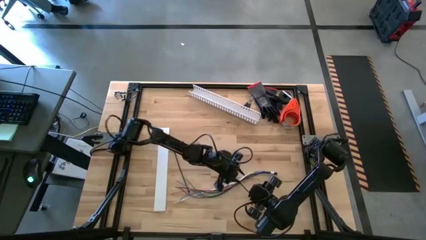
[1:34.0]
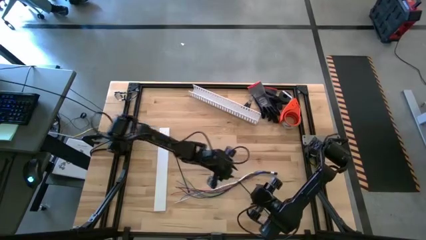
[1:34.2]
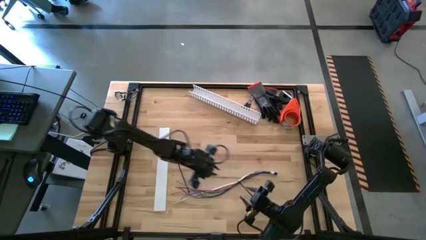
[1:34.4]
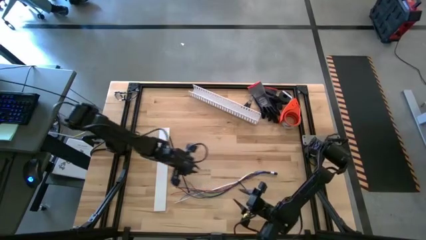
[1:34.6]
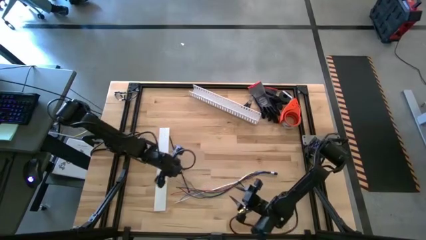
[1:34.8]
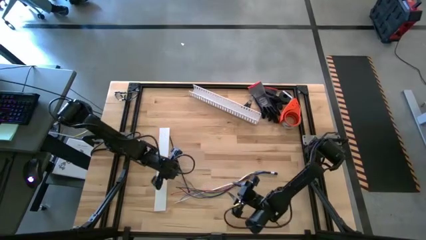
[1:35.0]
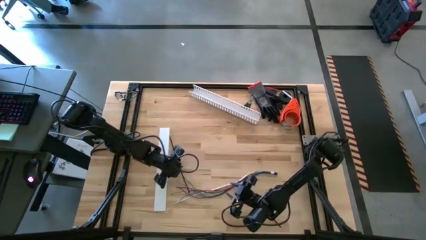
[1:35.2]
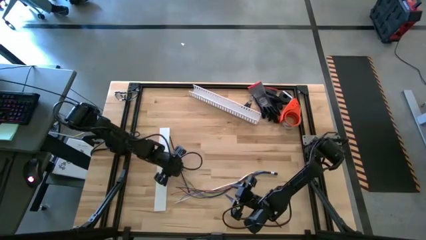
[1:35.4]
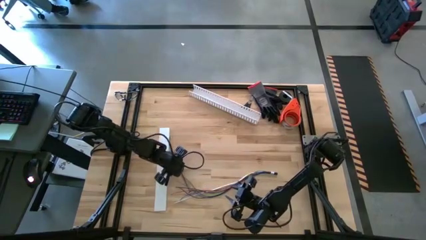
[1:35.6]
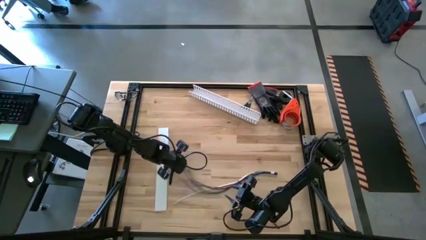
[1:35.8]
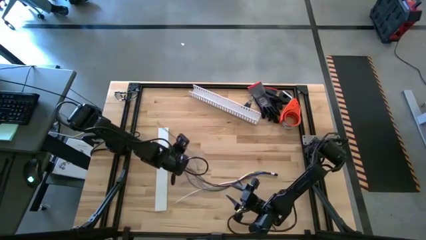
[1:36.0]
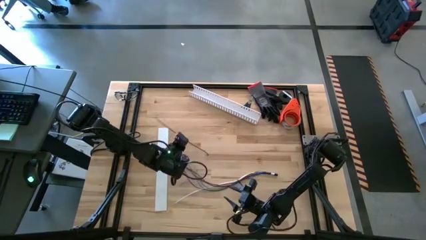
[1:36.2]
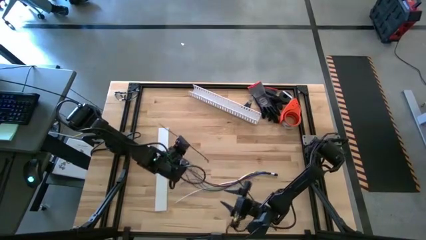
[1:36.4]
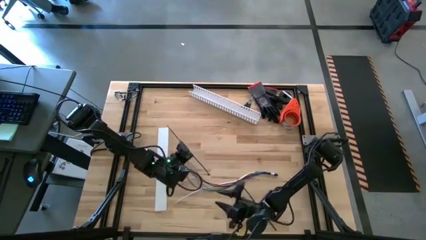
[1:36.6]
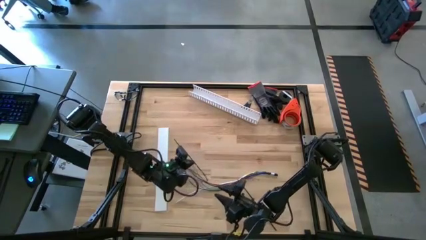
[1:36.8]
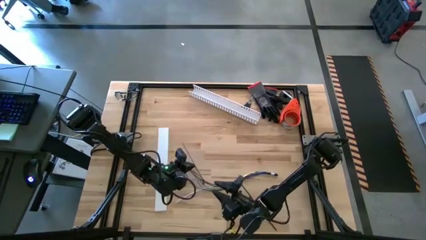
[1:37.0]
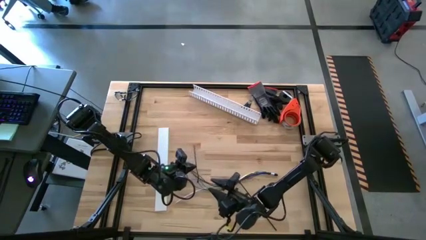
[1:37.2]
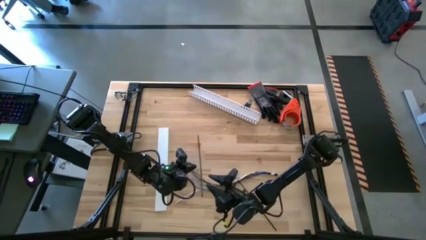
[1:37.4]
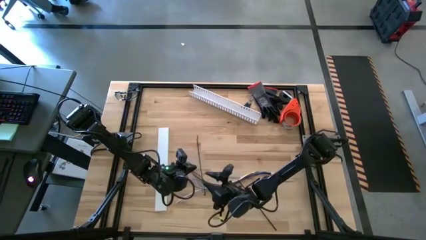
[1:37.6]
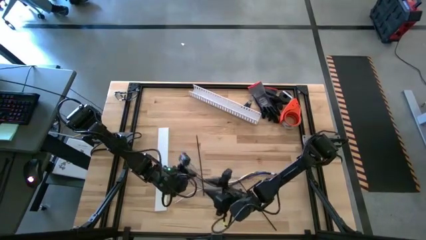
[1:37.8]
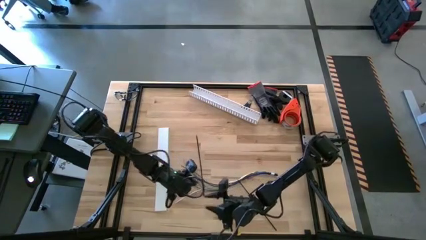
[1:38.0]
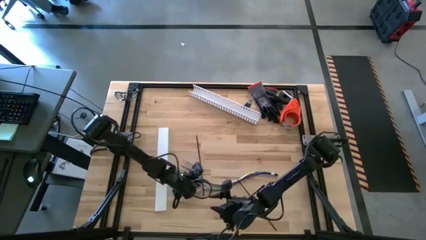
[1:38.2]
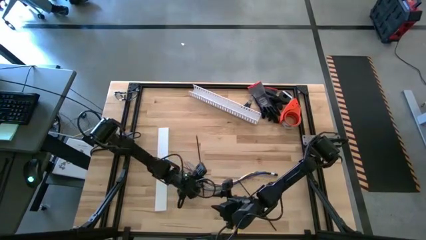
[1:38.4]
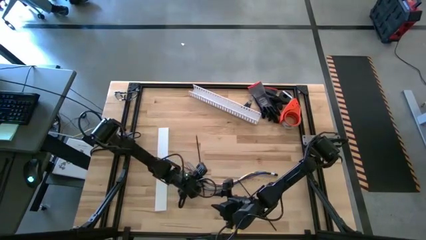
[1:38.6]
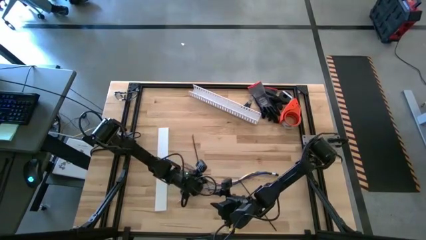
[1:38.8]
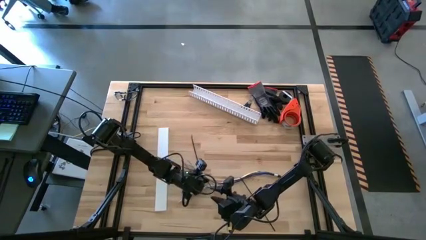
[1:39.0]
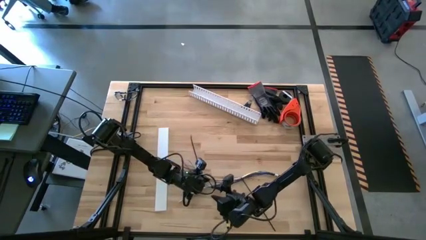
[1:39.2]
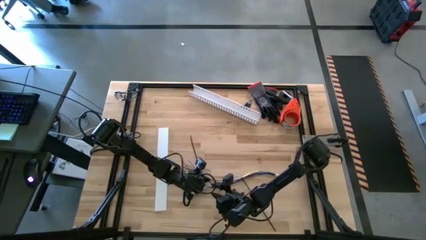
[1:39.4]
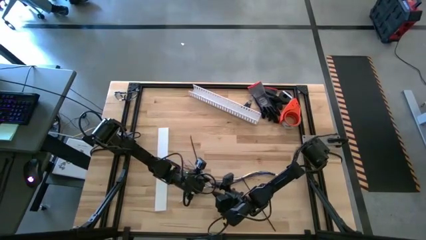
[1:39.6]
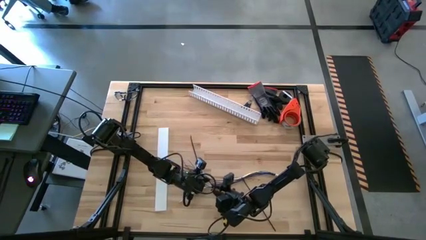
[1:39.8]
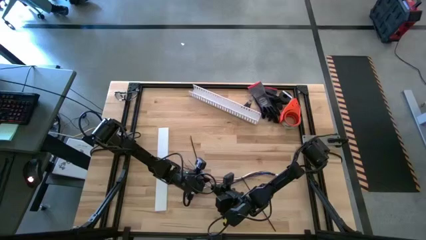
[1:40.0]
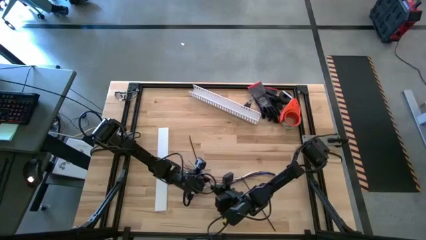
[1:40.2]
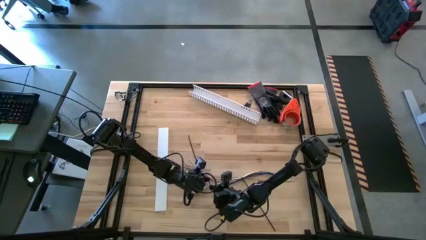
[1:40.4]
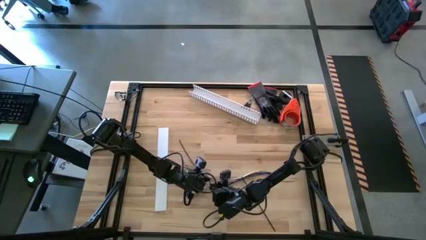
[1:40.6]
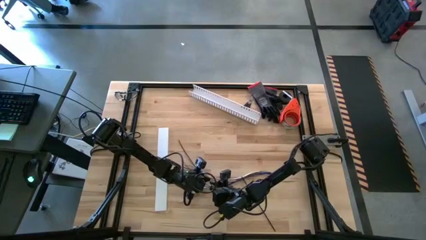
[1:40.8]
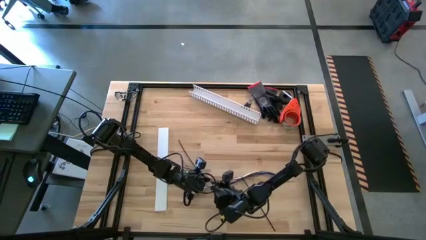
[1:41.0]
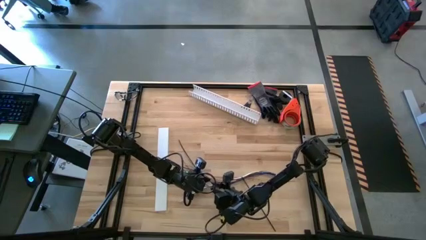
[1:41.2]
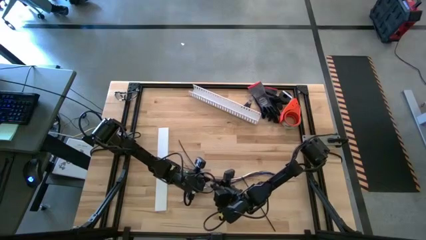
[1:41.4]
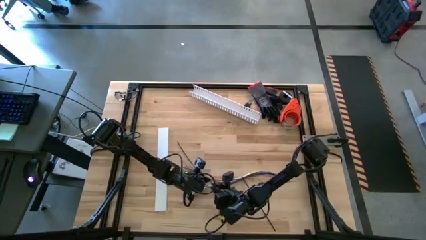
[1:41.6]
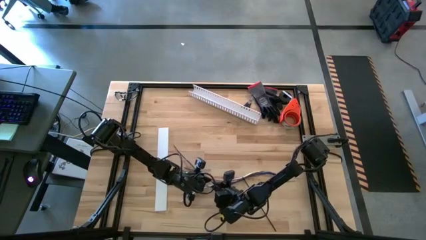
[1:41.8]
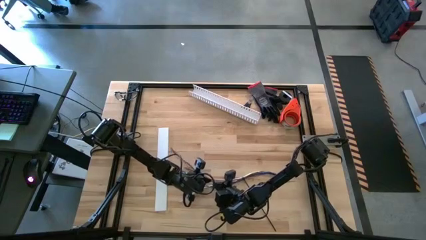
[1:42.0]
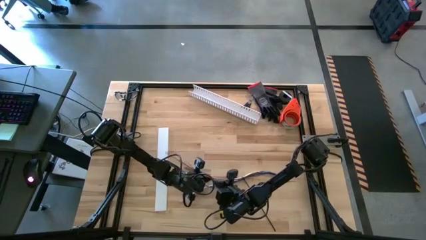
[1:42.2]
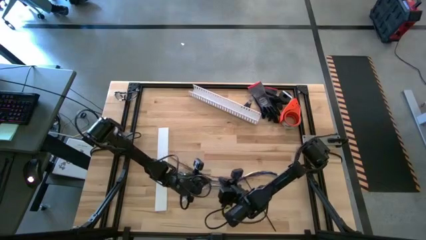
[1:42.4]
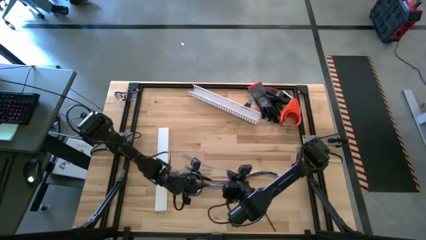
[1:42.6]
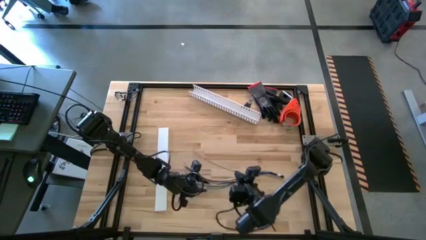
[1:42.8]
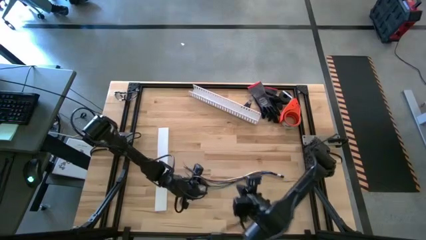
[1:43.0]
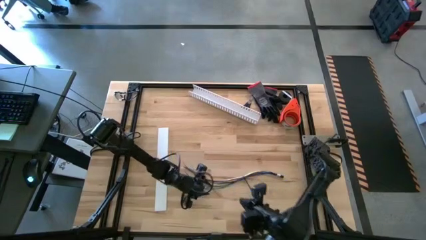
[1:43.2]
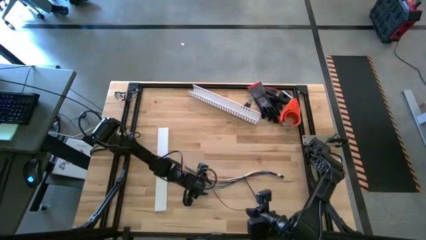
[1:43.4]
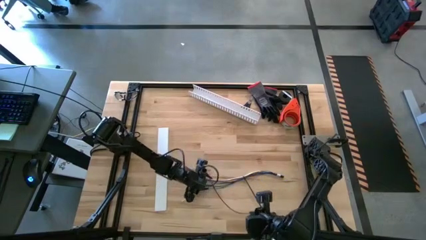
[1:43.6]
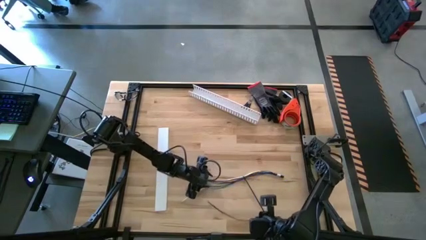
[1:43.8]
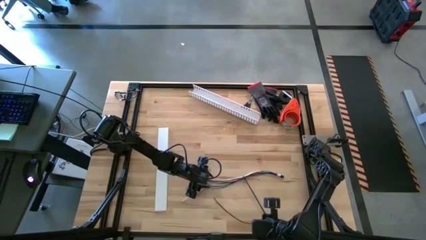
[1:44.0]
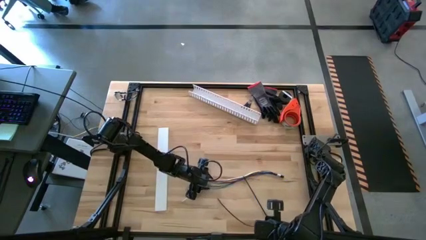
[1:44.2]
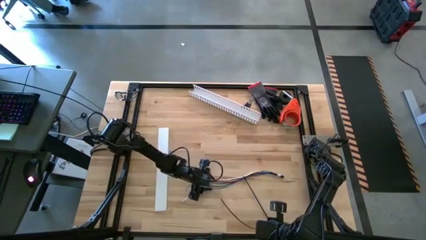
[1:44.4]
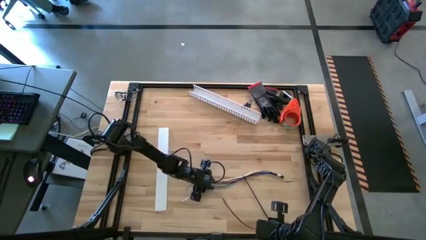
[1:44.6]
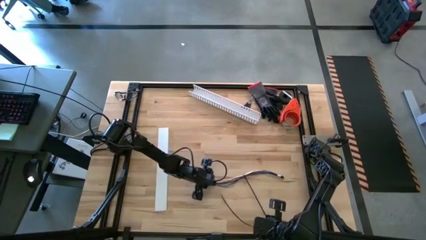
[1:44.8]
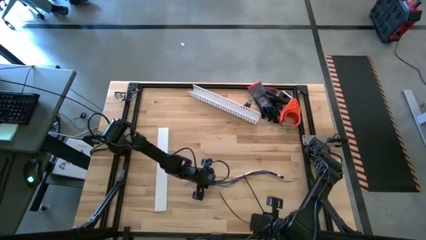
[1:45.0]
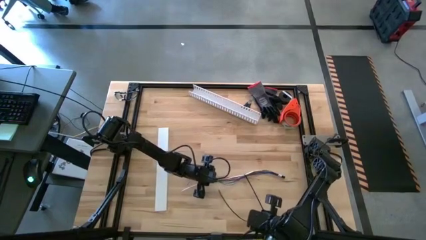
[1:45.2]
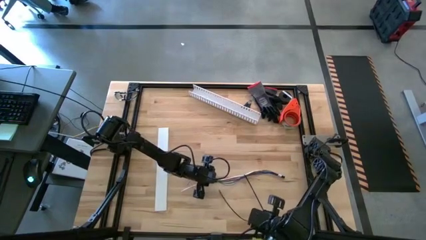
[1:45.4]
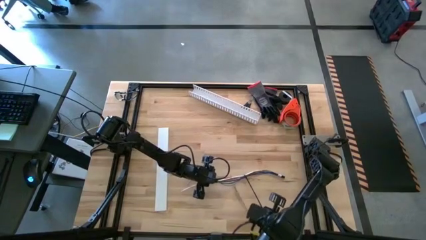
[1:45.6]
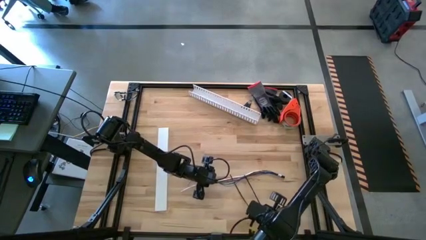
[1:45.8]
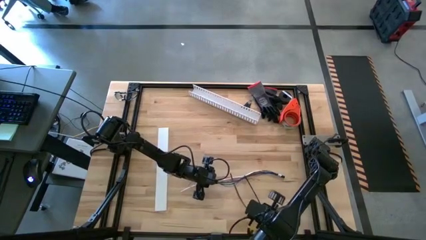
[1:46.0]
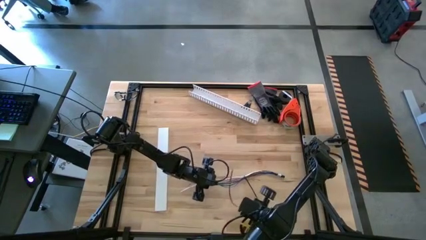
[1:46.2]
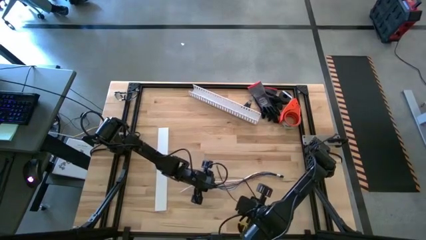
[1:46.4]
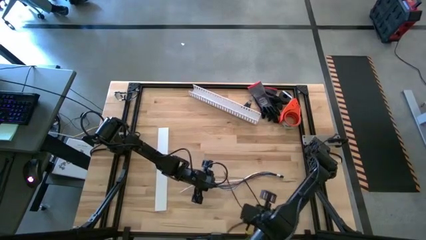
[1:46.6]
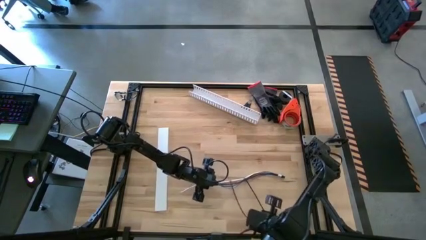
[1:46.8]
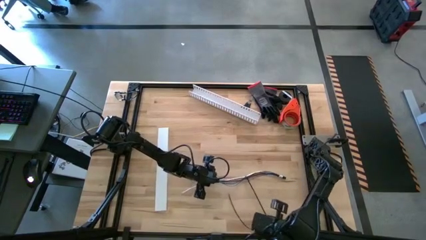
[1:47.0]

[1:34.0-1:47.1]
Task: Ziptie cables
Wrap the zip tie on the cable

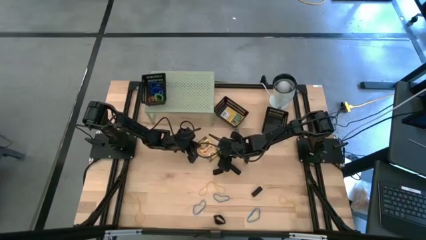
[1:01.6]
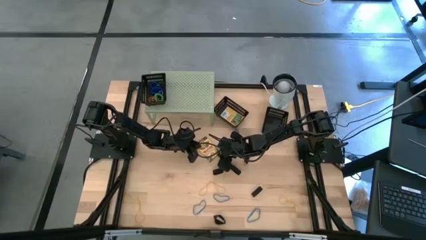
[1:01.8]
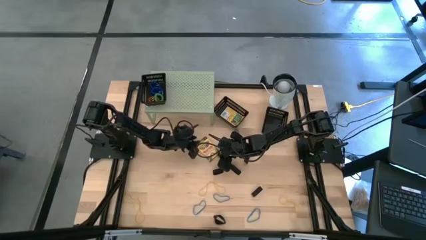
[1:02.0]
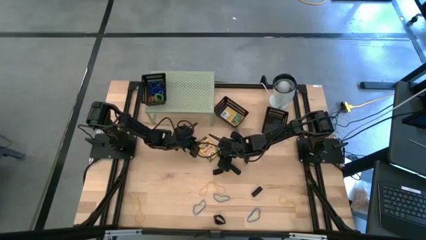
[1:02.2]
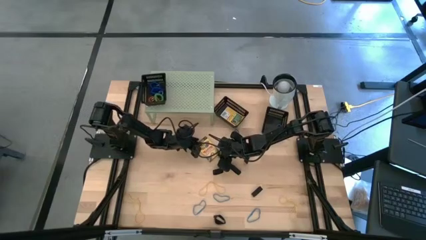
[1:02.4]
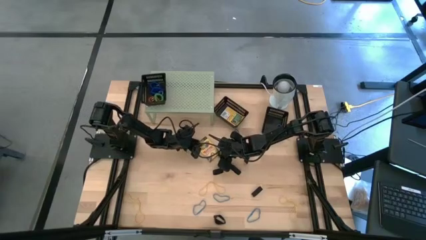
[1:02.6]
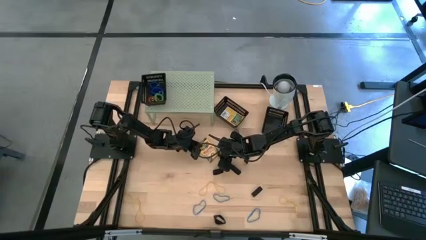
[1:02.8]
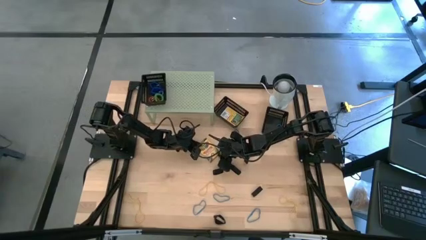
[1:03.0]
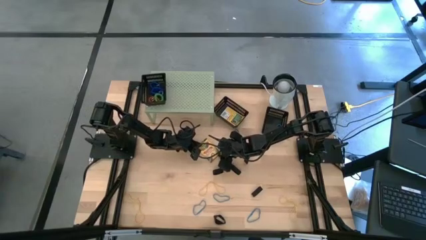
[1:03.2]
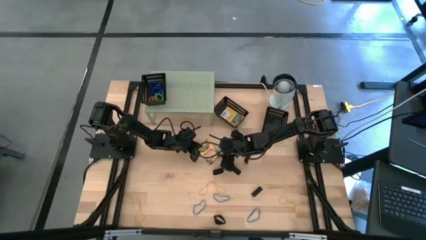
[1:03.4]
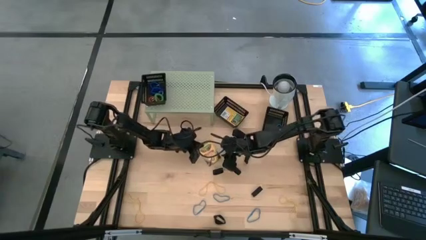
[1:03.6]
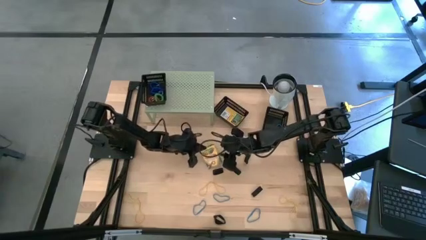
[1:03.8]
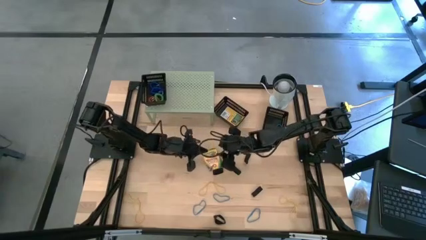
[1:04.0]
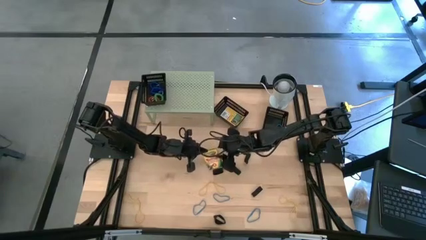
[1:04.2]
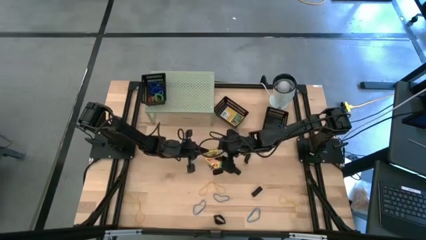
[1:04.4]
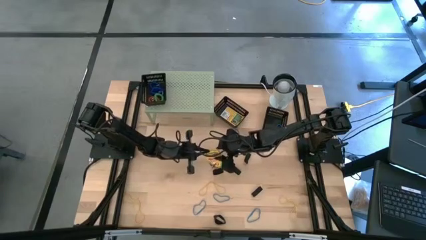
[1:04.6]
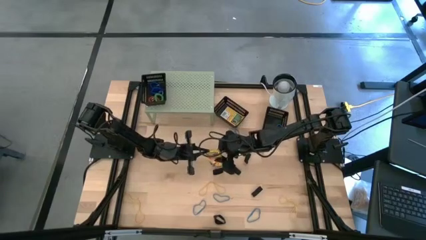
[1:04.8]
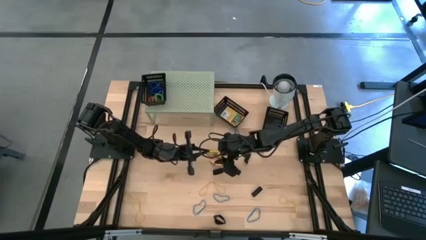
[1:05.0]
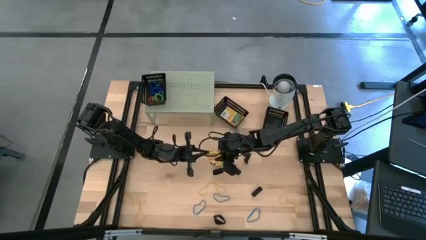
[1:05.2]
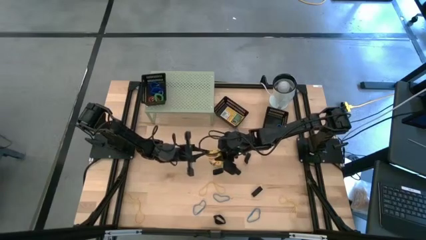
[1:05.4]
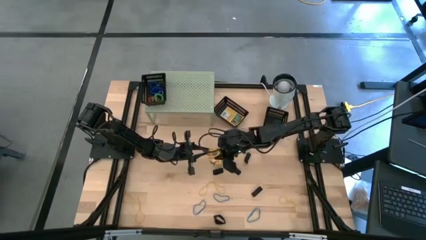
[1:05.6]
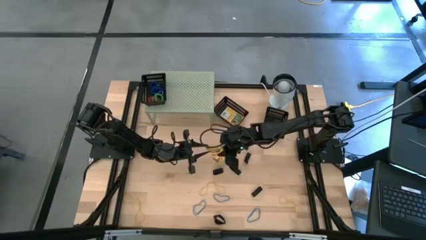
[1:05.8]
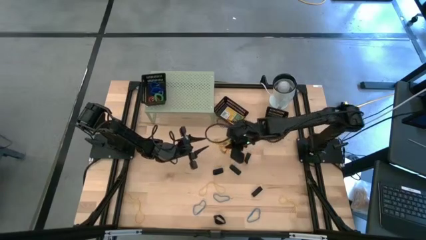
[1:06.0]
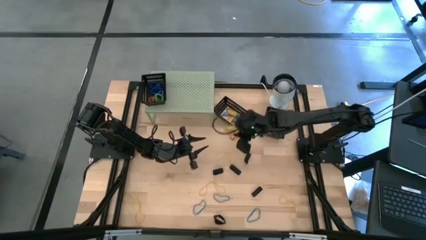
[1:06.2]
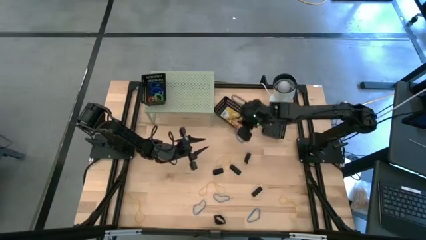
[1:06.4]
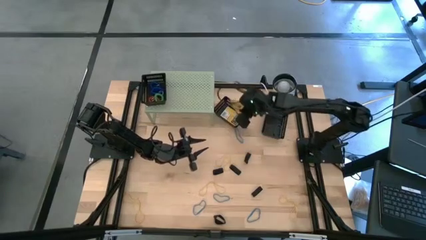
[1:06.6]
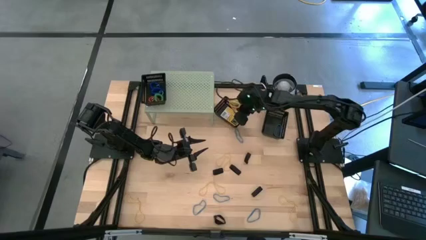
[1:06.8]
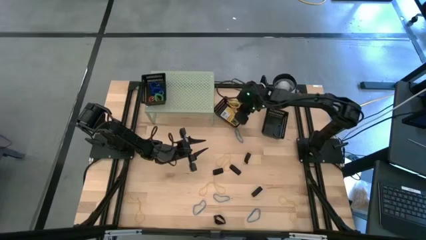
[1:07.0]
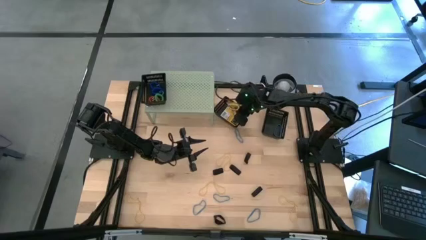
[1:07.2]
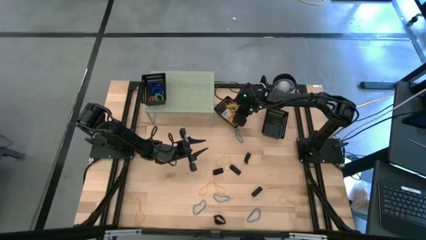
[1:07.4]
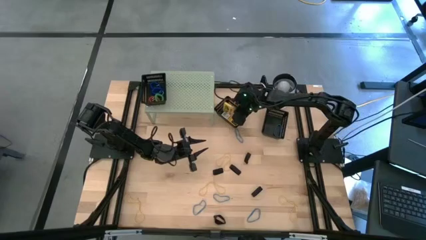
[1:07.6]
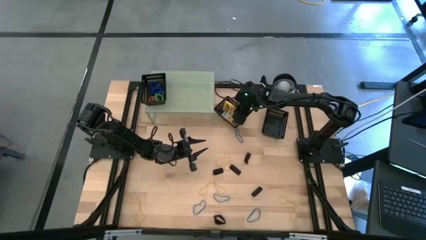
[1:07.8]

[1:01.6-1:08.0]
Task: Pick & Place Office Desk Supplies
Put the yellow crayon box into the left black bin
